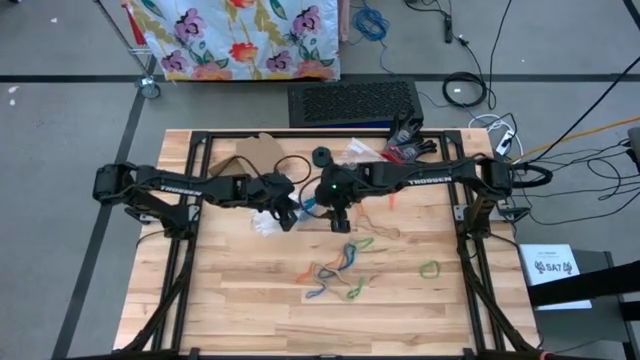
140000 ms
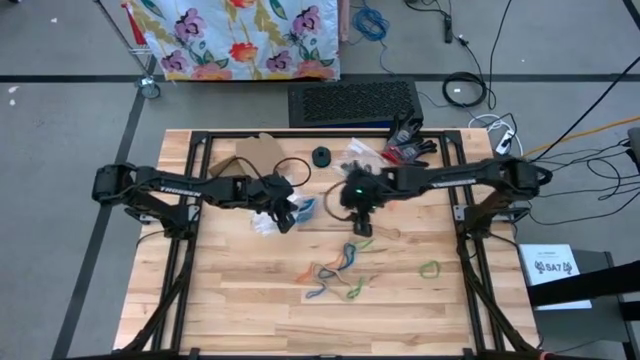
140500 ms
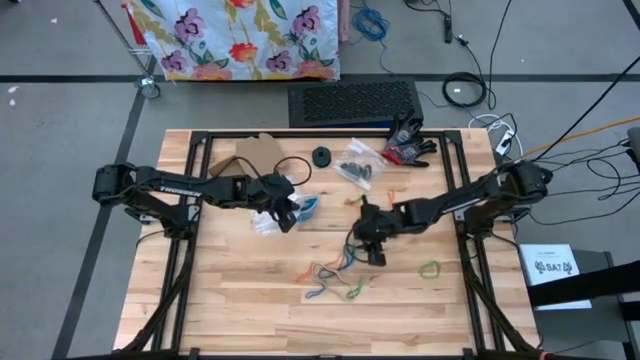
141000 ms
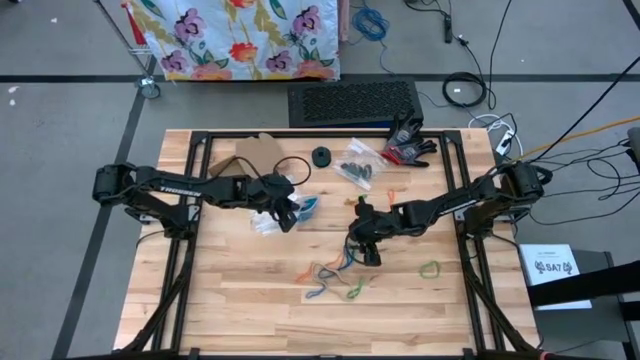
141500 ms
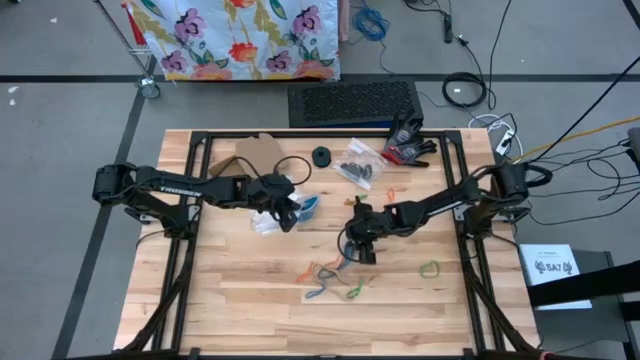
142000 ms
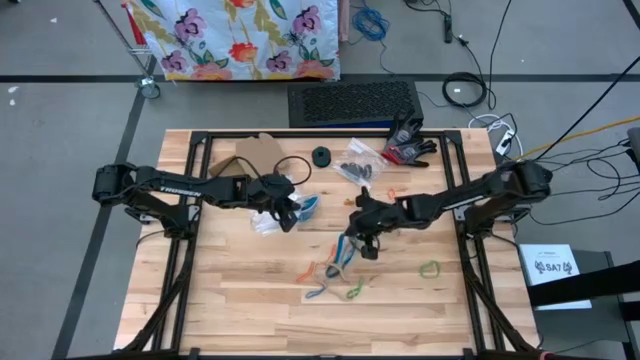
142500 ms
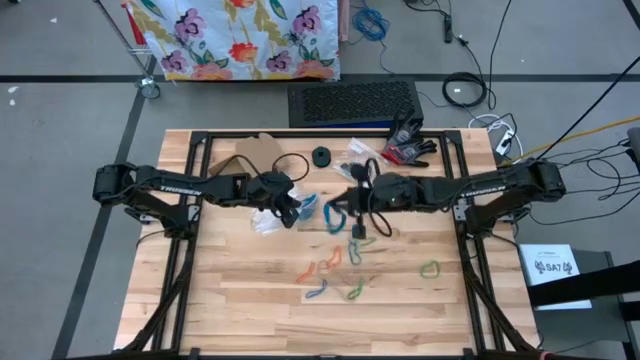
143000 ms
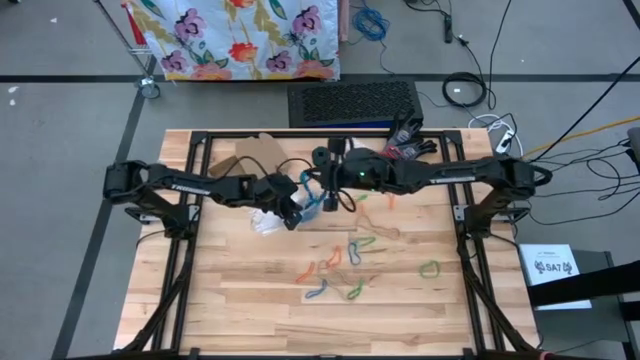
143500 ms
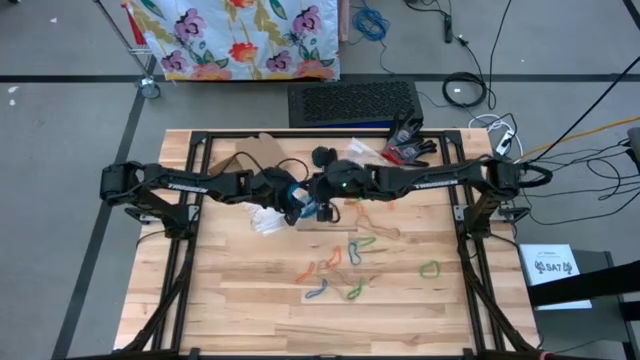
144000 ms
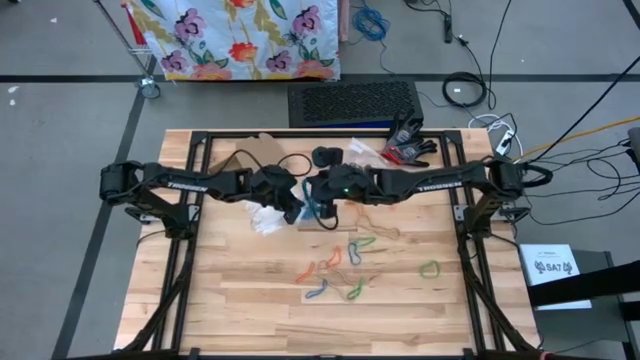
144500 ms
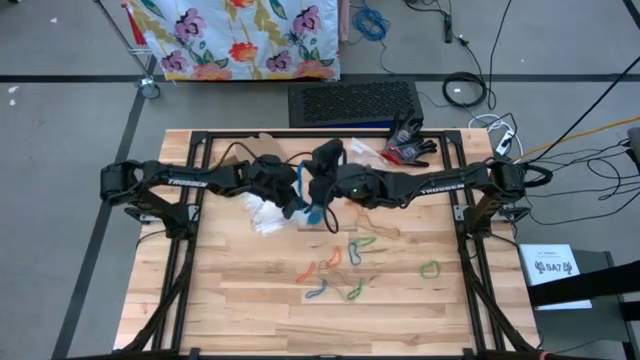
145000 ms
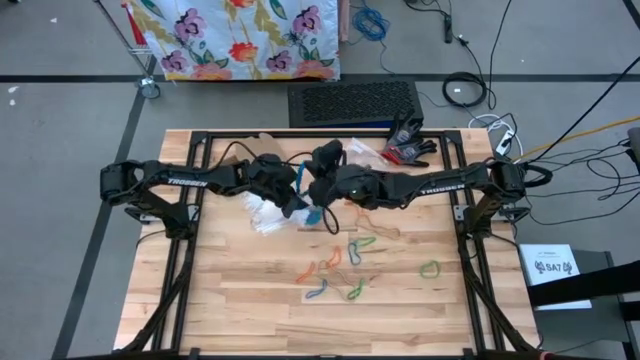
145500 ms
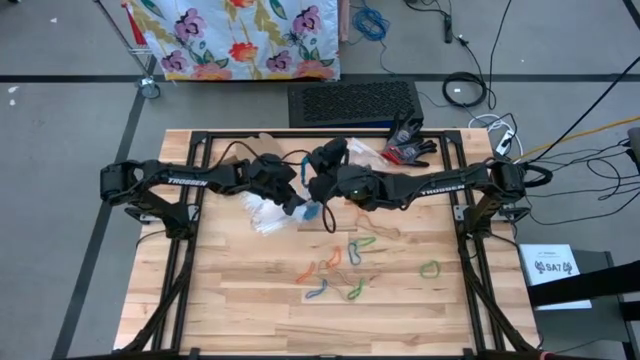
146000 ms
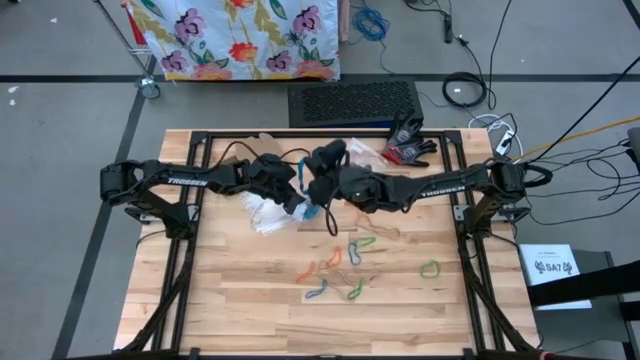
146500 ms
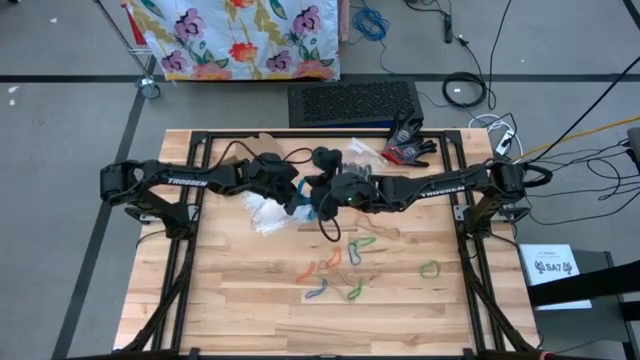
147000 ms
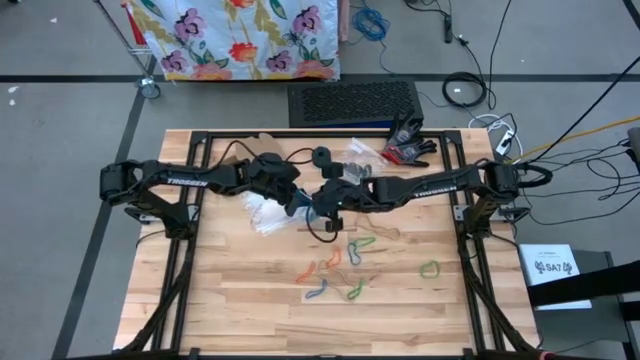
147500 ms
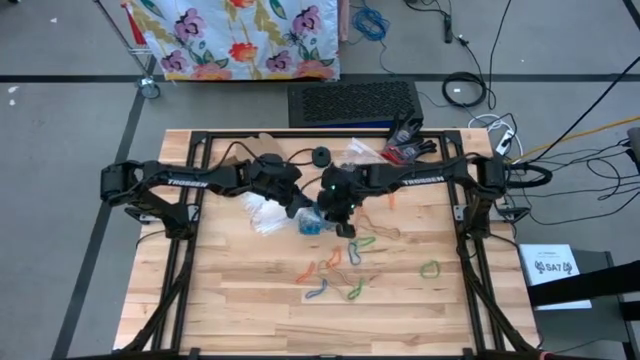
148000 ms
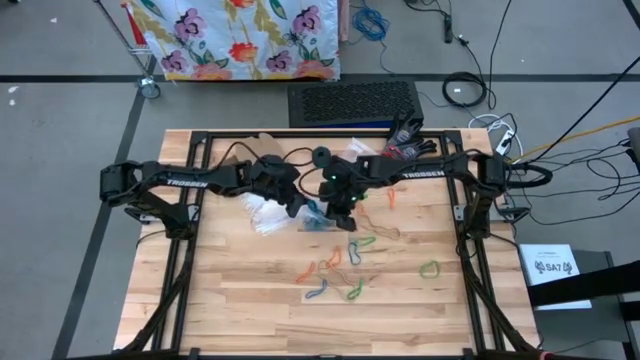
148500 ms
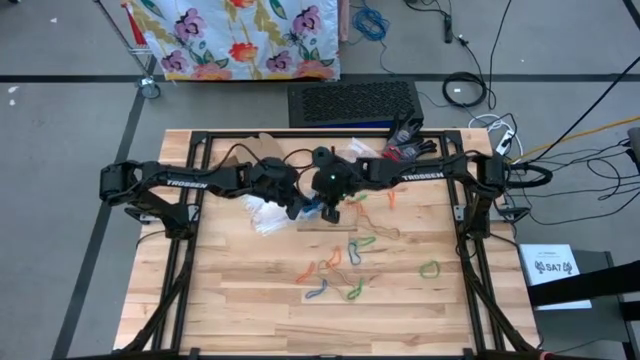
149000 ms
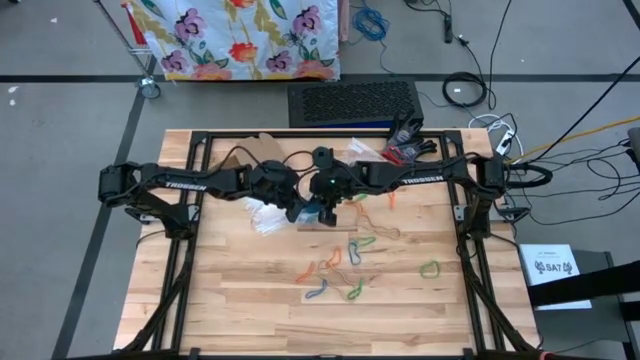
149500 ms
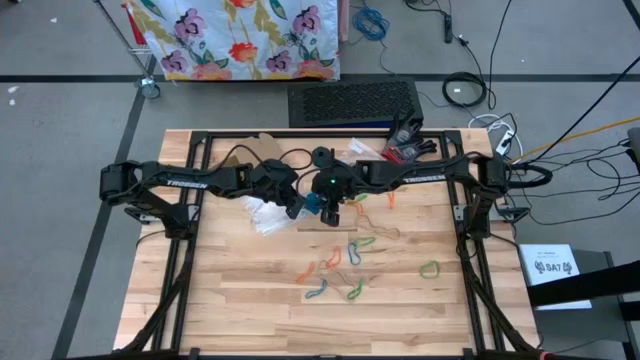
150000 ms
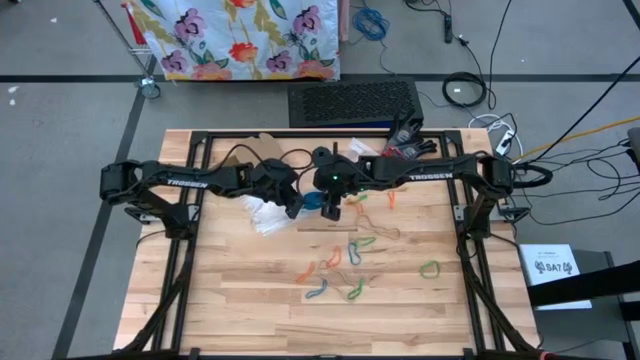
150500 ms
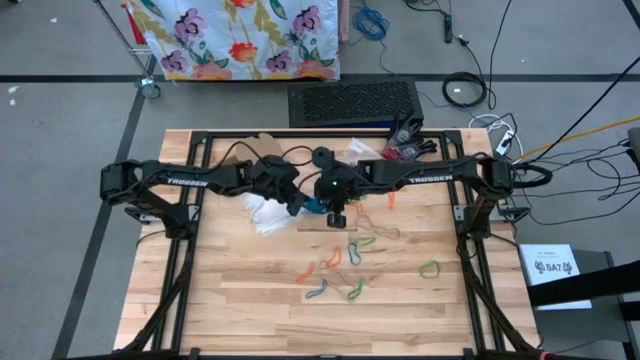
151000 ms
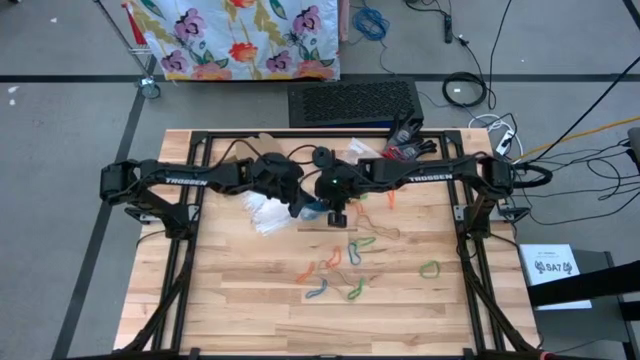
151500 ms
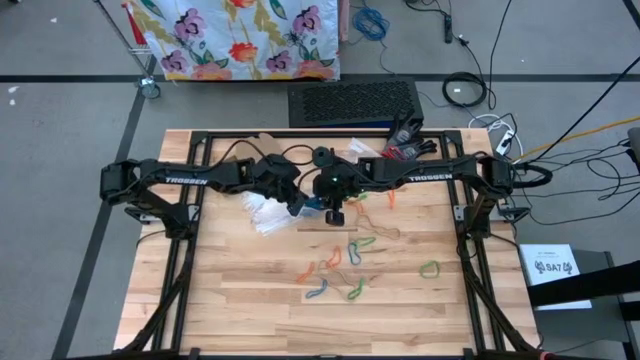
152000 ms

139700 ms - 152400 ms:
Task: Sort rubber bands
Put the blue rubber band into the transparent zip bag

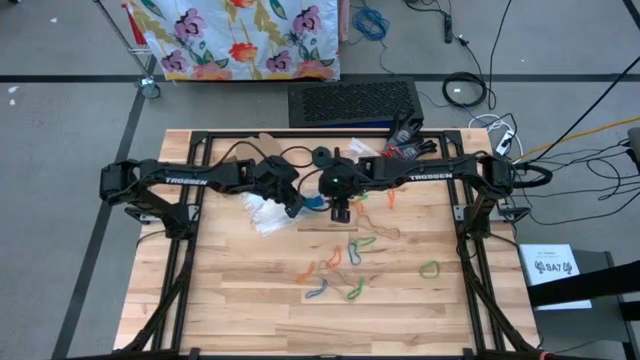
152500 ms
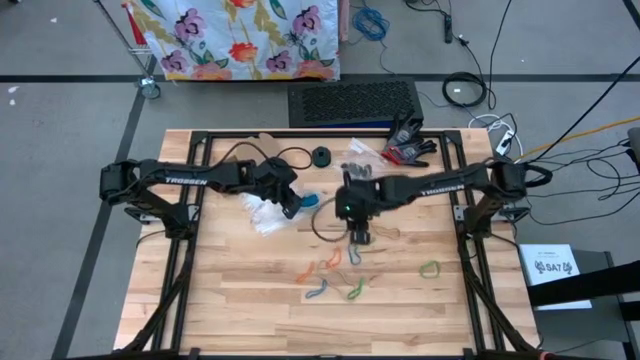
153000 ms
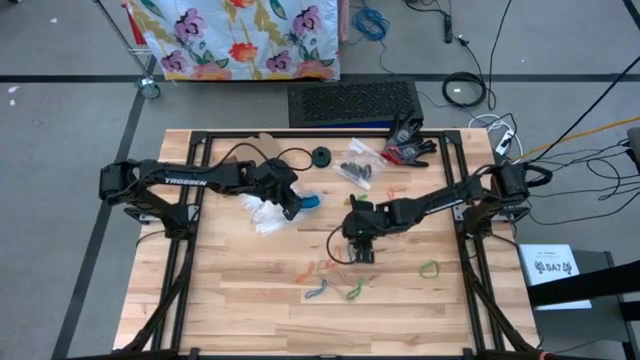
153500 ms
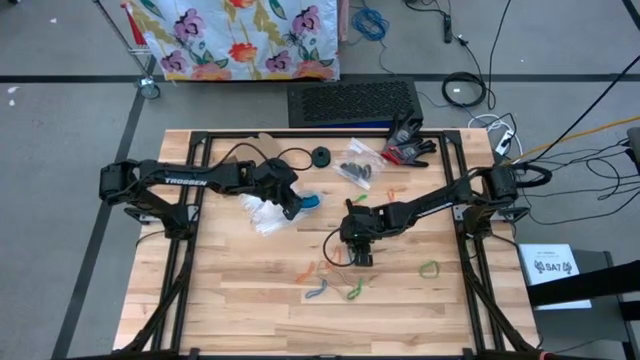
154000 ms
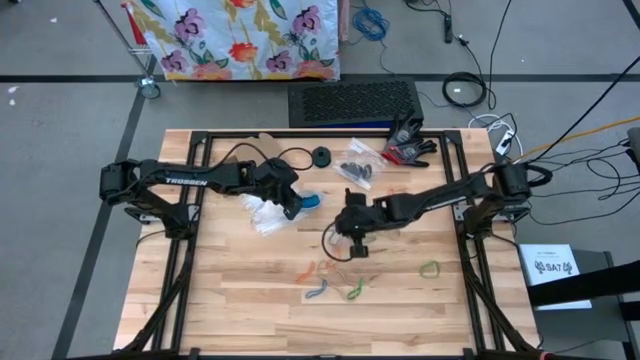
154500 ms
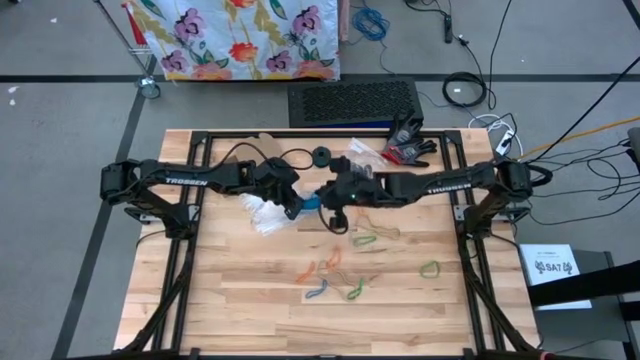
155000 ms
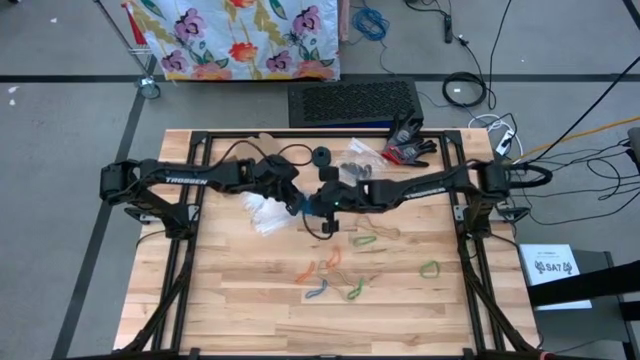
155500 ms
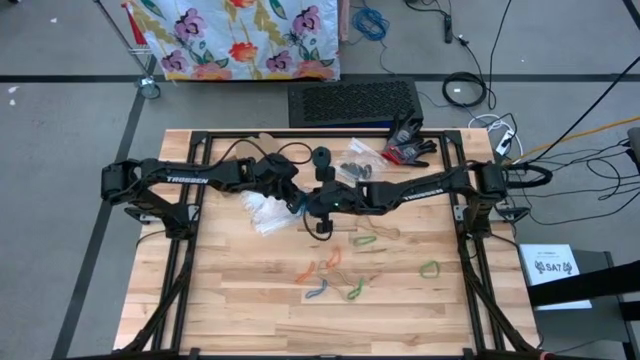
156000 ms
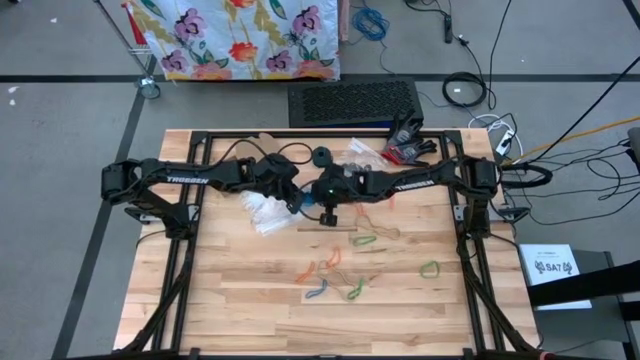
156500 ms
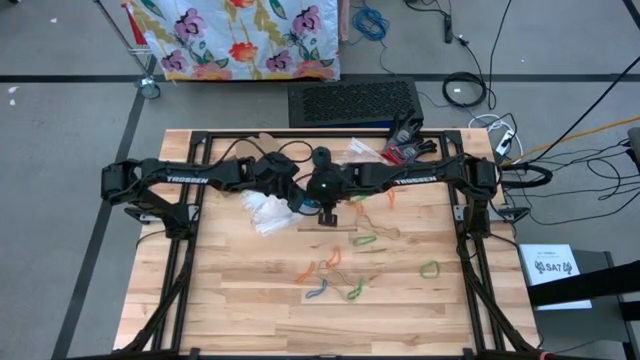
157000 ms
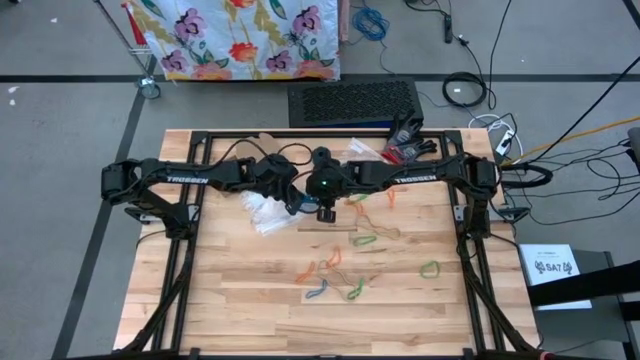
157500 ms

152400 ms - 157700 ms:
Put the blue rubber band into the transparent zip bag

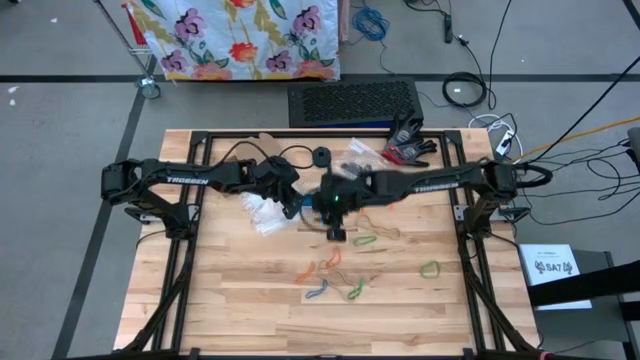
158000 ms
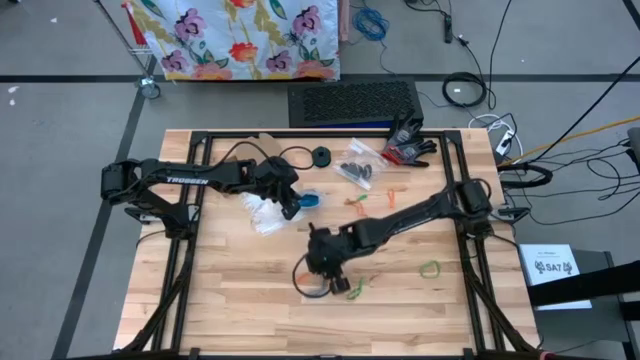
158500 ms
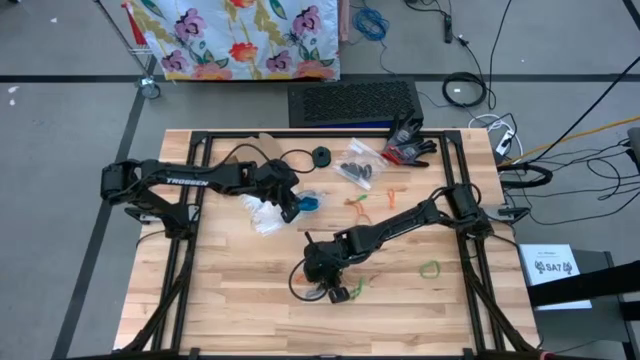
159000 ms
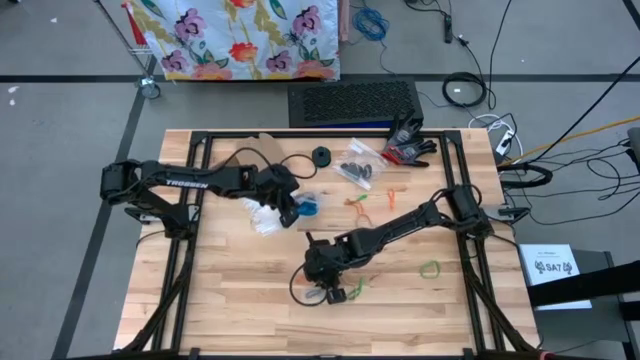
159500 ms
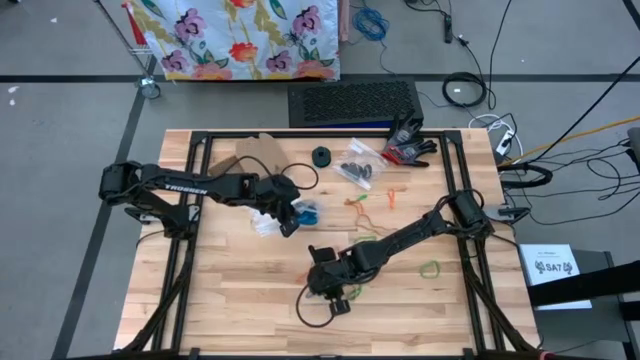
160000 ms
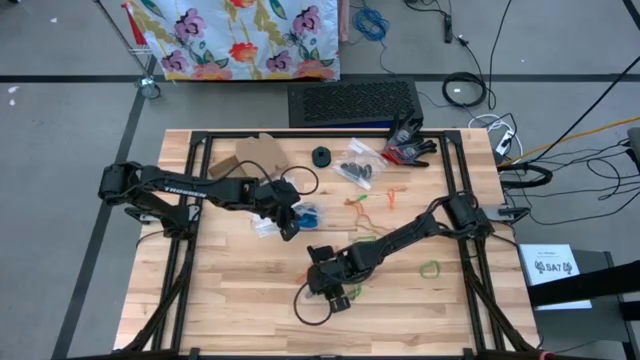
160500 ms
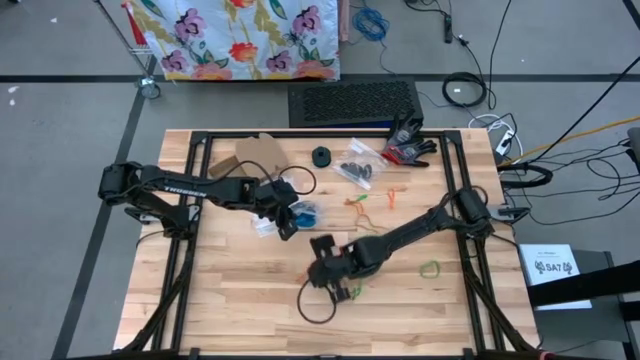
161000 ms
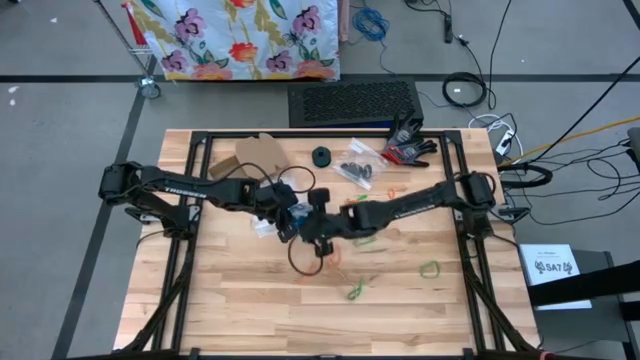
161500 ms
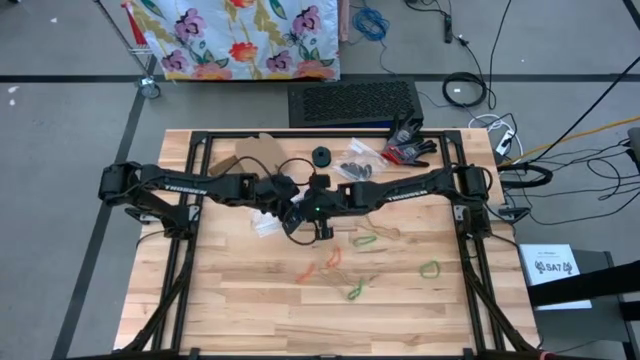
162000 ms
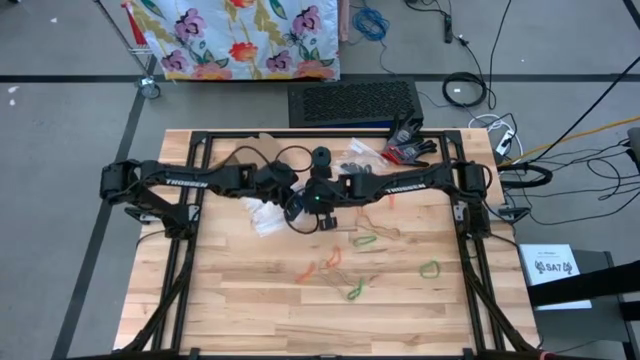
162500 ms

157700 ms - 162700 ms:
Put the blue rubber band into the transparent zip bag
